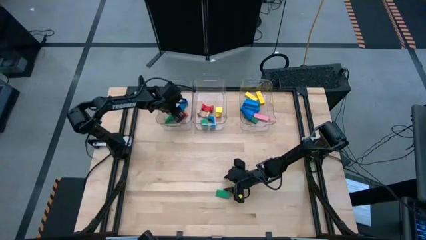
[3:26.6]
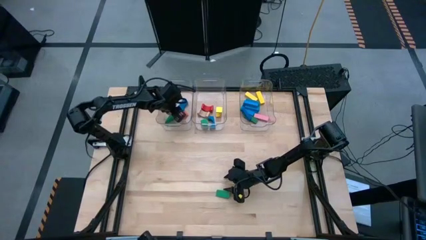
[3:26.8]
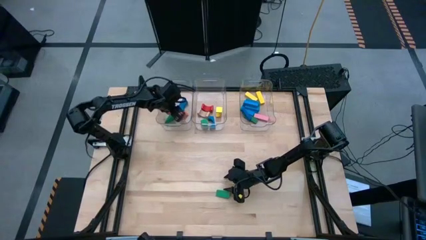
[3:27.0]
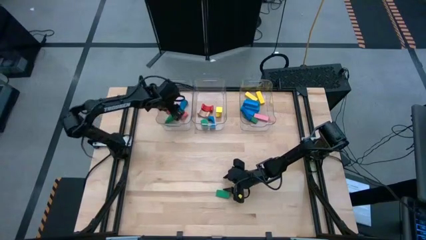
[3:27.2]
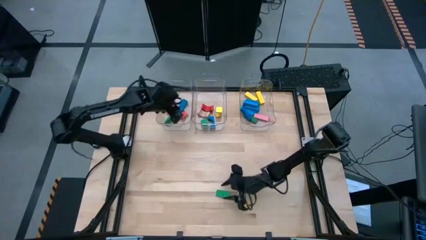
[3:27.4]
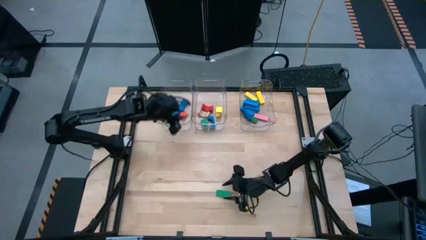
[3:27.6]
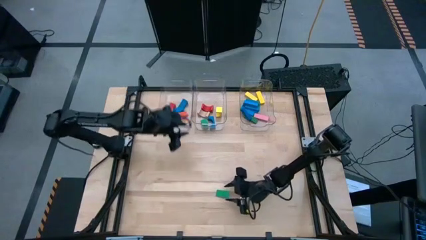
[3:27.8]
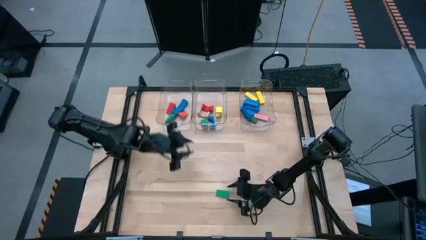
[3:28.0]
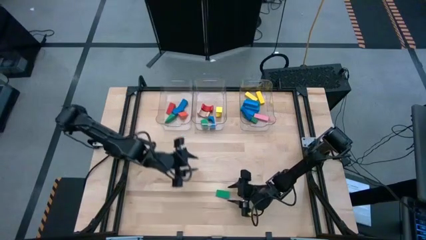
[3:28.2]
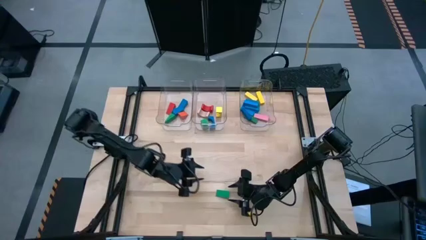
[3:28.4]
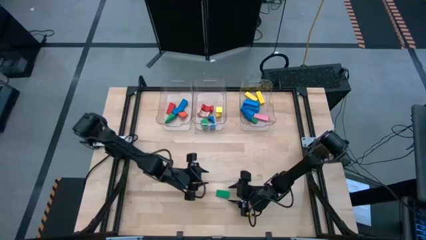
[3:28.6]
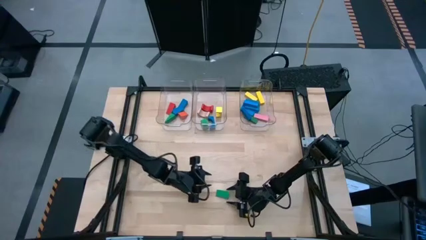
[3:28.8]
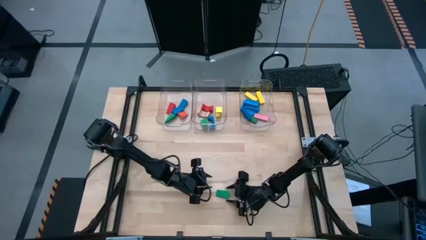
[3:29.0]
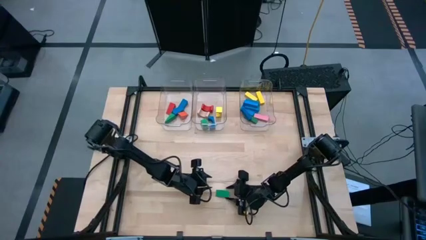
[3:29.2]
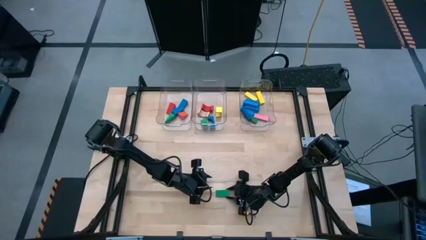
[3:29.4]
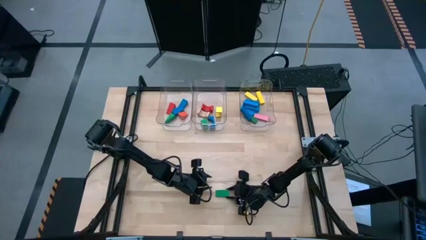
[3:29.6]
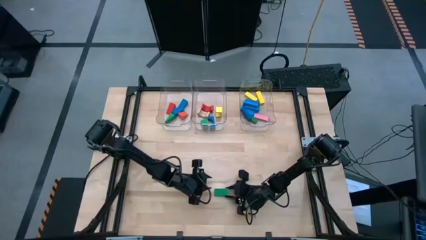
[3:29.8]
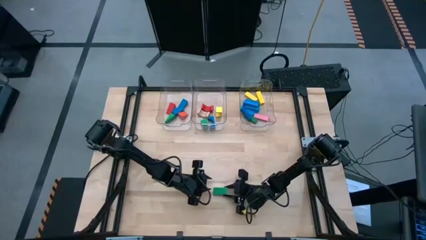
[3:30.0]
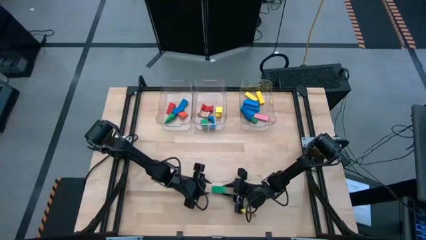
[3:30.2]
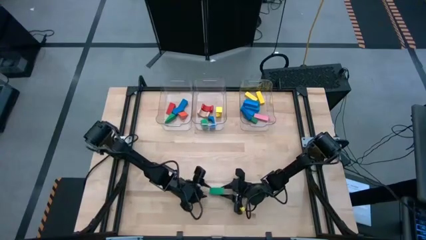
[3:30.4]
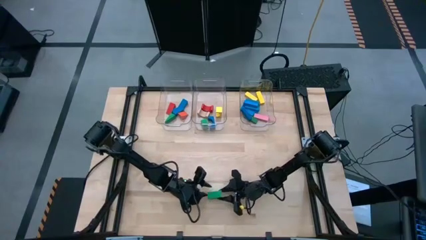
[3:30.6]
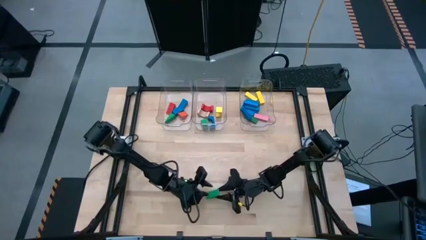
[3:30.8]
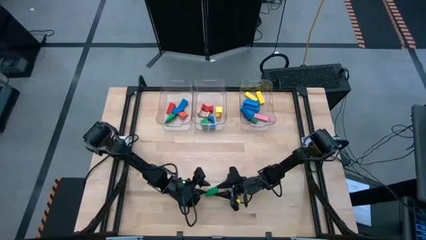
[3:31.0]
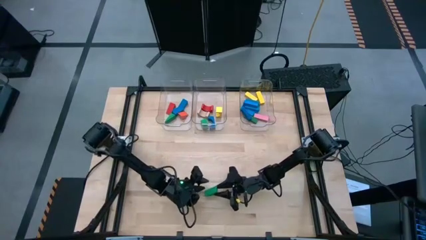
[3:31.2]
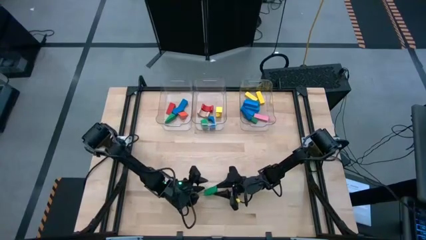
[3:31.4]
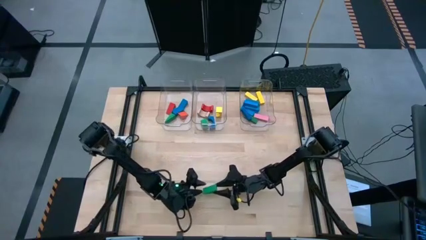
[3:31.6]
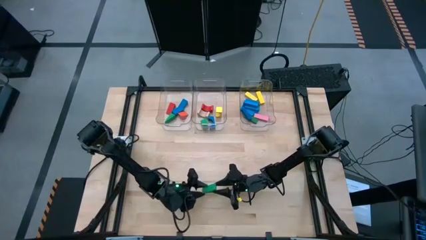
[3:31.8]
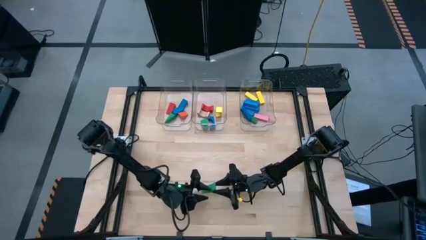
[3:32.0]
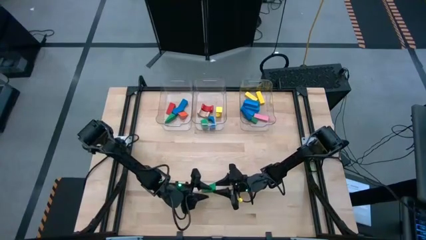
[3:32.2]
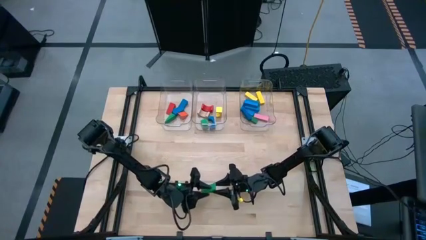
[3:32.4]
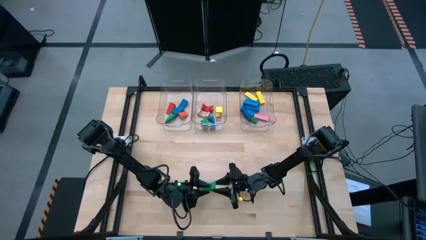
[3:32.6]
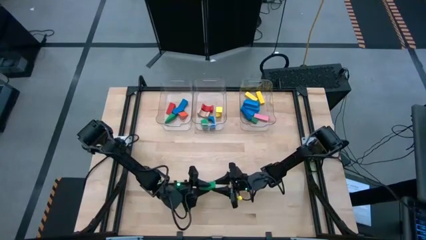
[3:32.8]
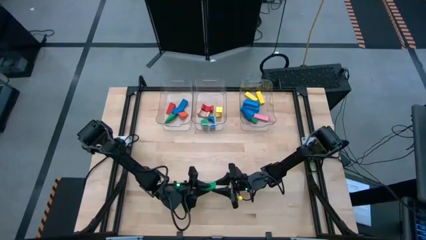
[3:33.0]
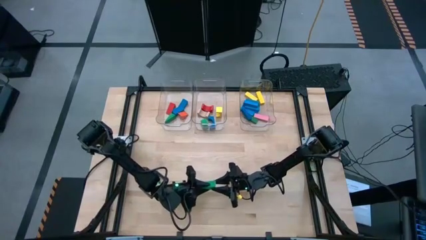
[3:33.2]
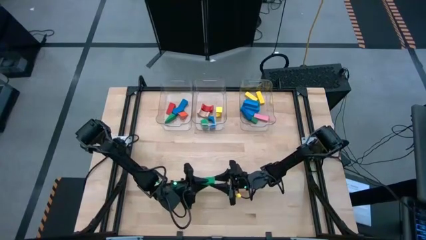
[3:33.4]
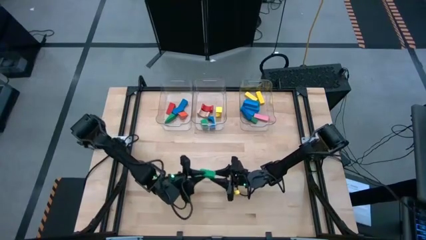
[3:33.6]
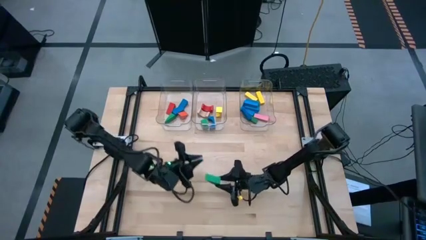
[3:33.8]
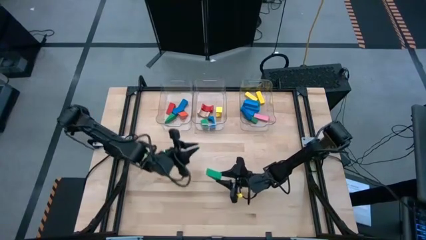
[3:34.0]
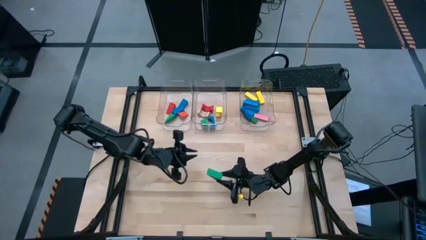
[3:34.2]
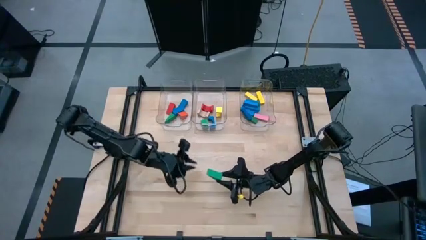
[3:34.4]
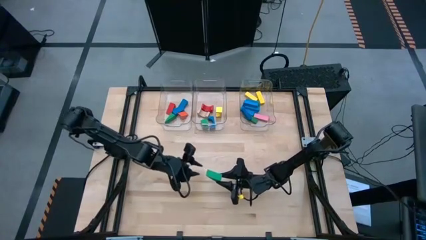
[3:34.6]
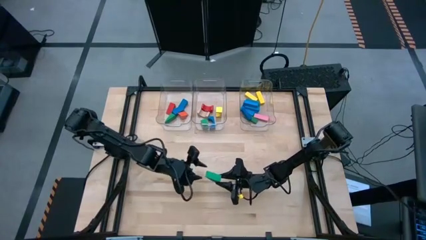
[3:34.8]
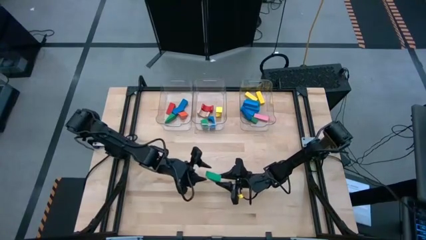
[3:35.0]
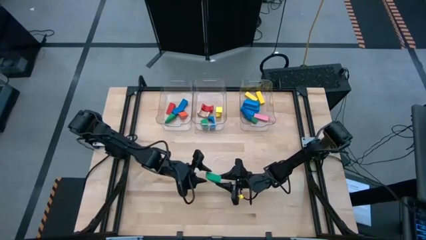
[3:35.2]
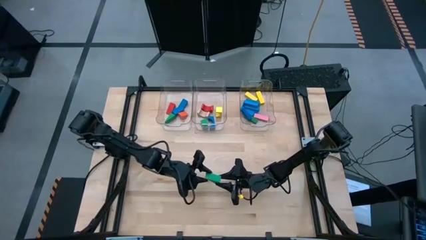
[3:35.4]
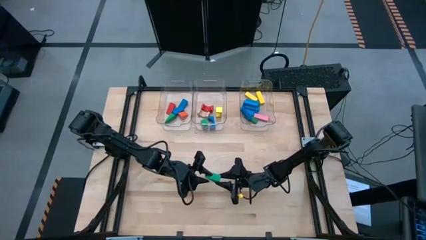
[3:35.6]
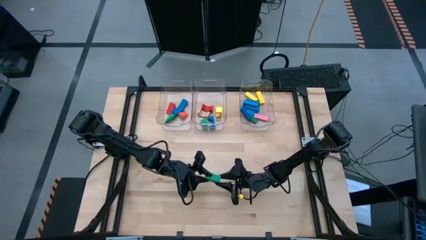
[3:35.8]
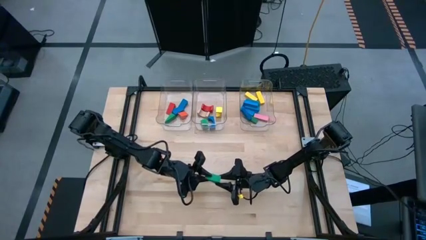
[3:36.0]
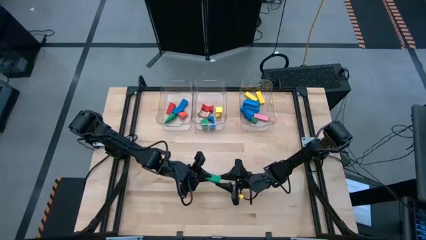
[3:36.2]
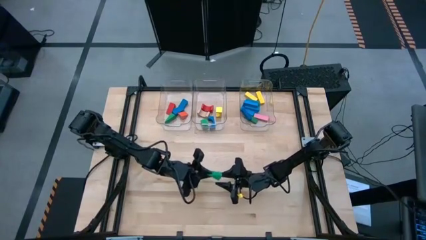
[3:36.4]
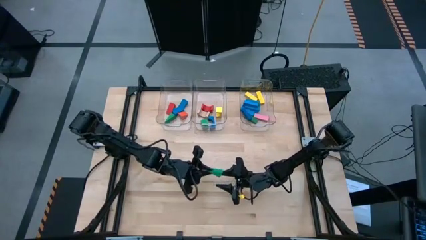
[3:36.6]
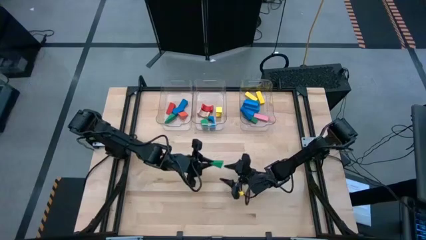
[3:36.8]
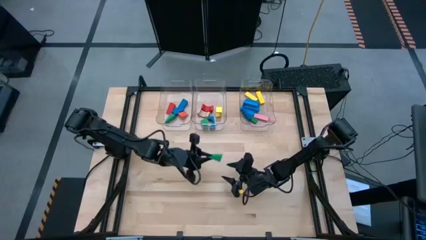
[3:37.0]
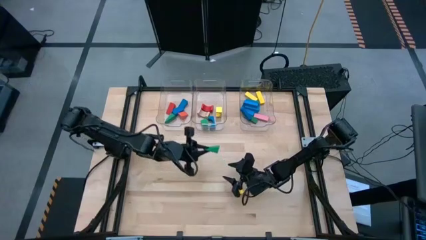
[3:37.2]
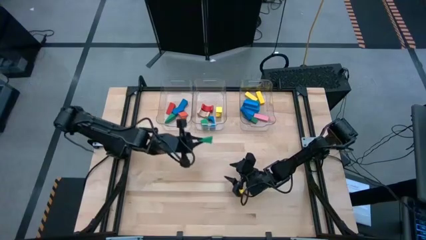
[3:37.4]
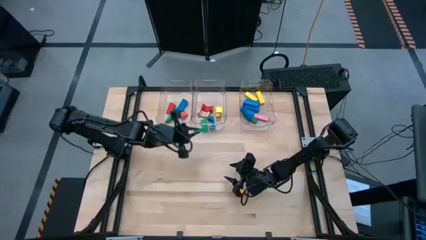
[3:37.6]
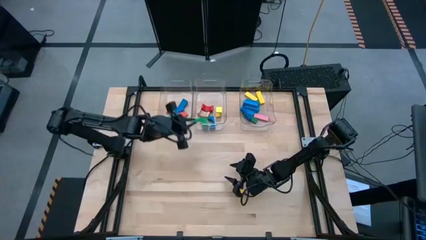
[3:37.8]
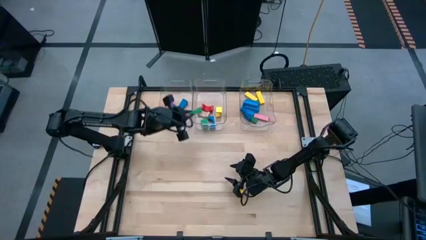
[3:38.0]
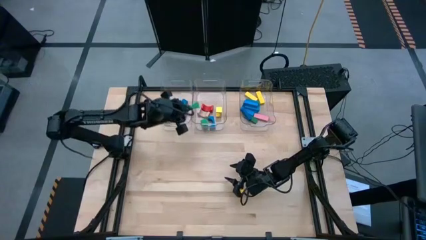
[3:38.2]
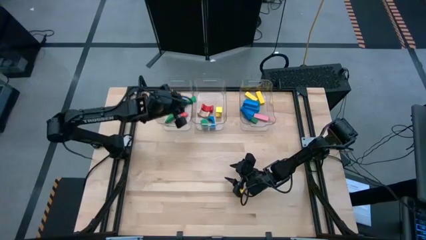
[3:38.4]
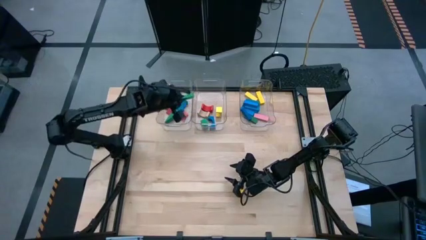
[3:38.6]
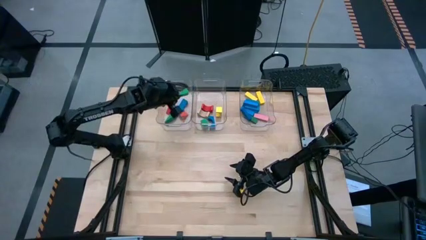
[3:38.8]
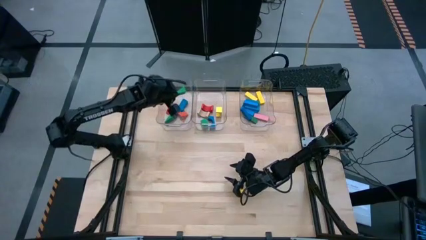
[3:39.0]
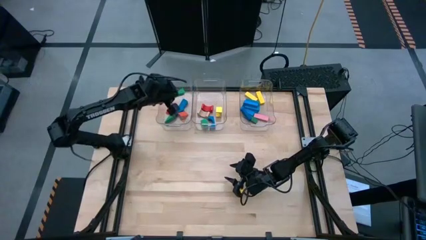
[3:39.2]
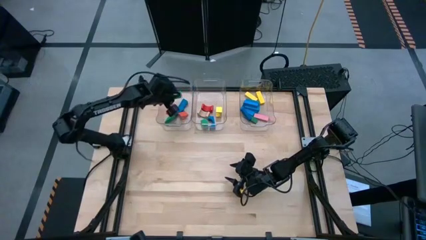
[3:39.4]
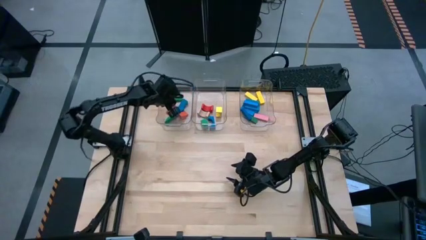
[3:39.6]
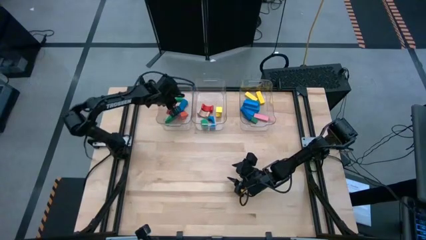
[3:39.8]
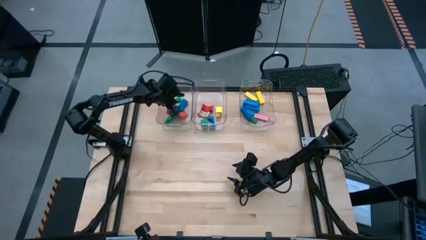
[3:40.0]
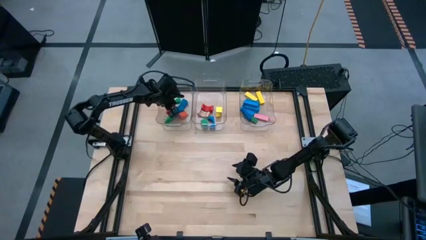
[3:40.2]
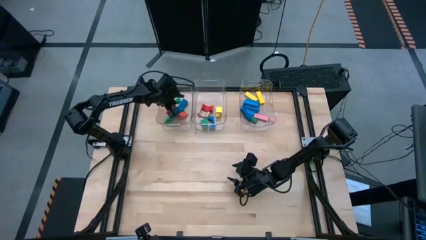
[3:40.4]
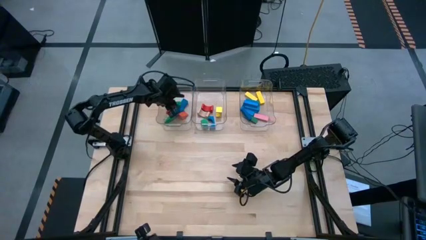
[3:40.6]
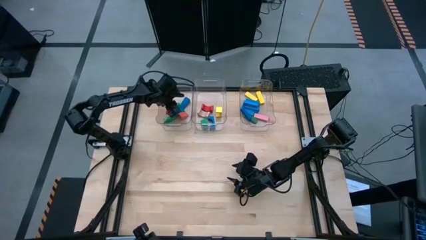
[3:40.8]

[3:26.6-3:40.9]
Task: Sort blocks by size
Put the green triangular block into the left transparent bin
